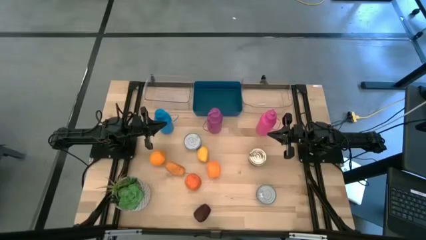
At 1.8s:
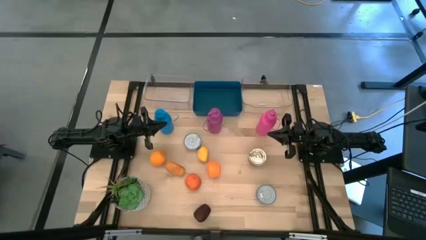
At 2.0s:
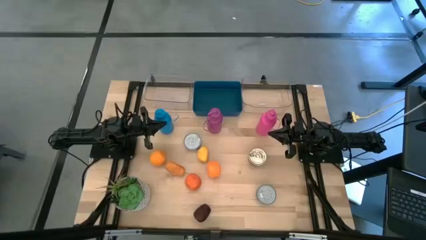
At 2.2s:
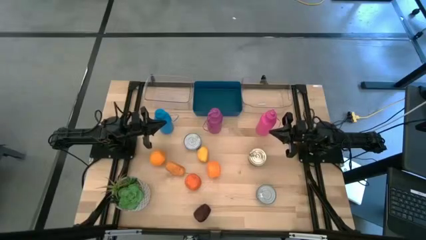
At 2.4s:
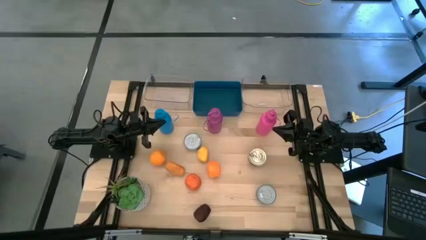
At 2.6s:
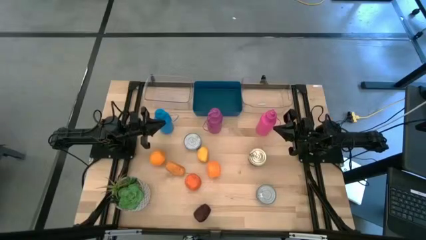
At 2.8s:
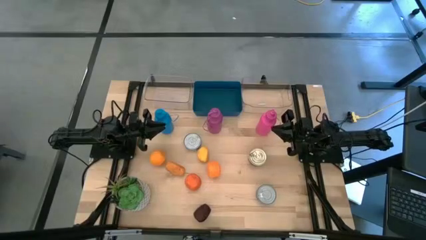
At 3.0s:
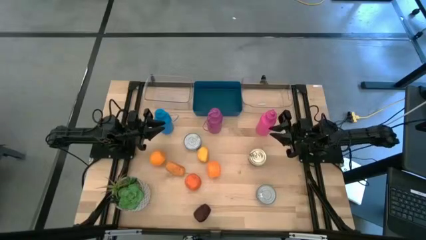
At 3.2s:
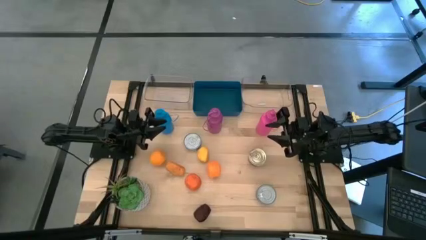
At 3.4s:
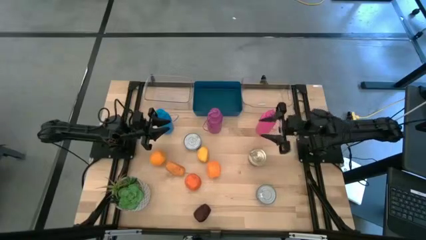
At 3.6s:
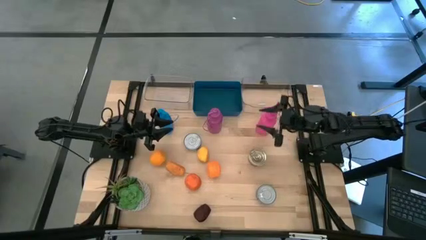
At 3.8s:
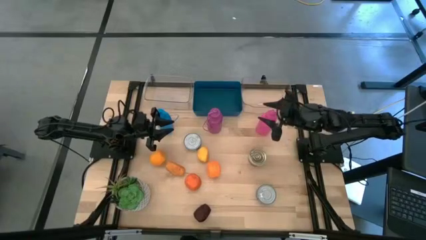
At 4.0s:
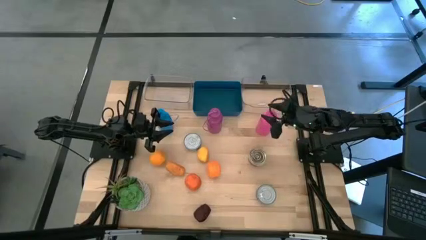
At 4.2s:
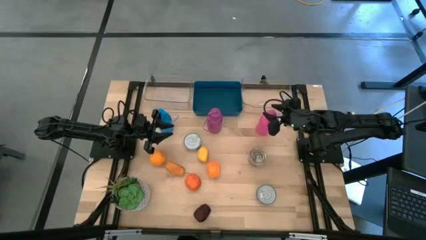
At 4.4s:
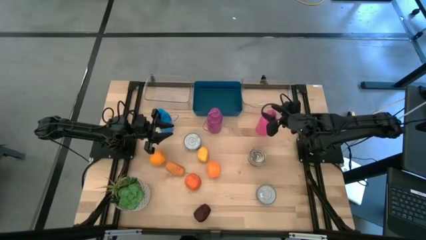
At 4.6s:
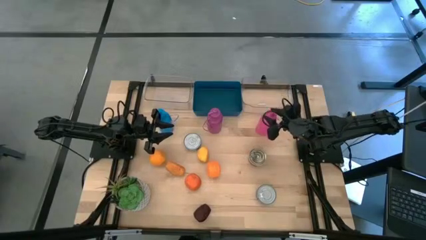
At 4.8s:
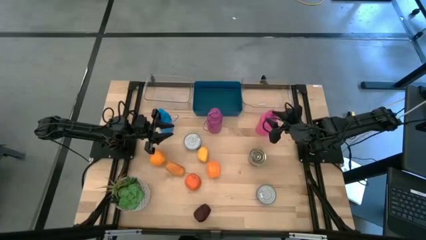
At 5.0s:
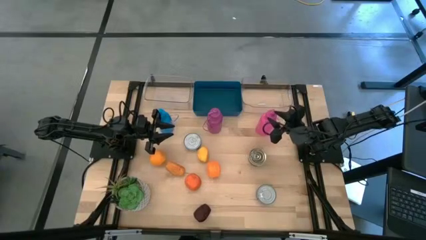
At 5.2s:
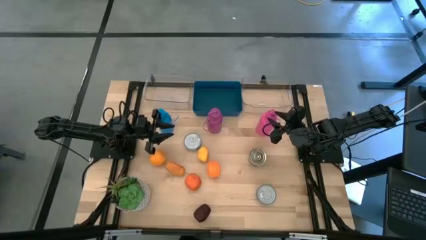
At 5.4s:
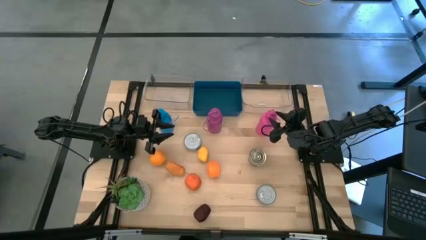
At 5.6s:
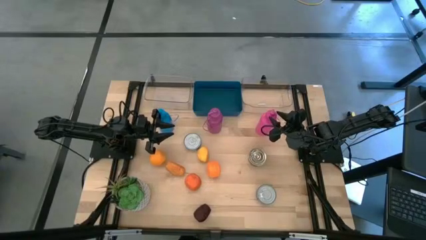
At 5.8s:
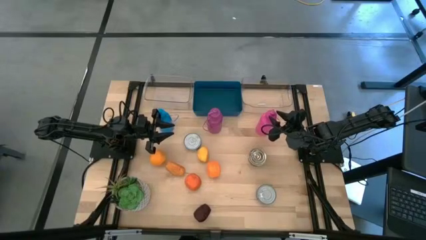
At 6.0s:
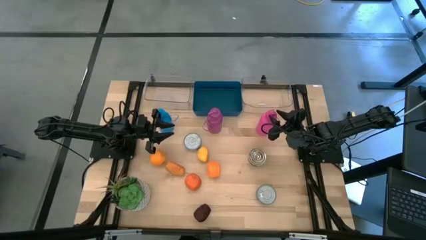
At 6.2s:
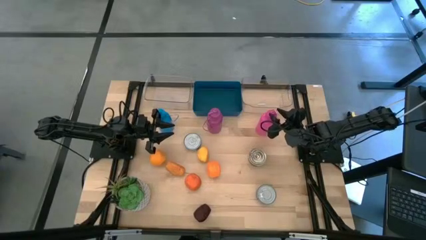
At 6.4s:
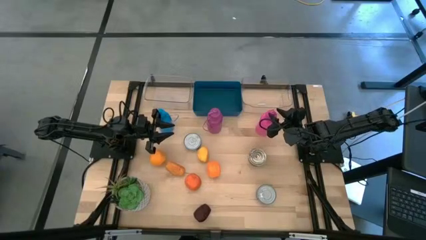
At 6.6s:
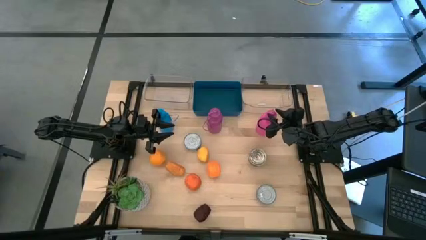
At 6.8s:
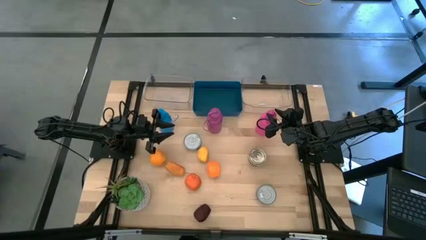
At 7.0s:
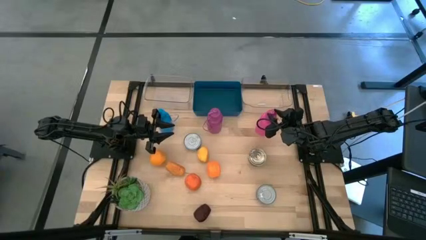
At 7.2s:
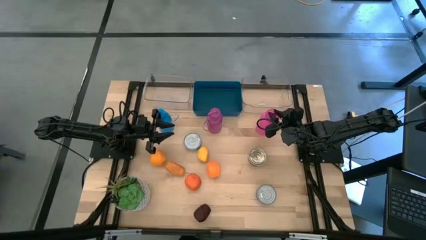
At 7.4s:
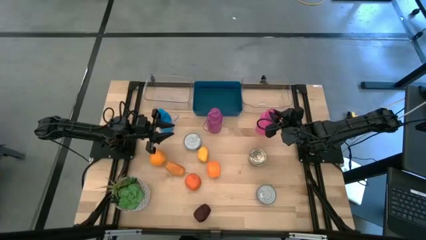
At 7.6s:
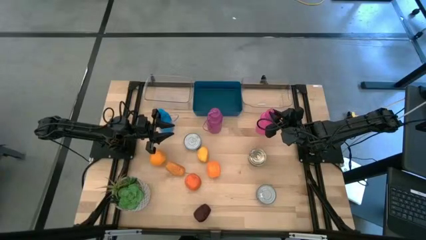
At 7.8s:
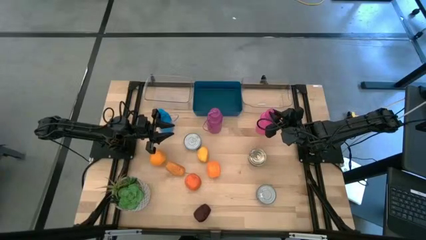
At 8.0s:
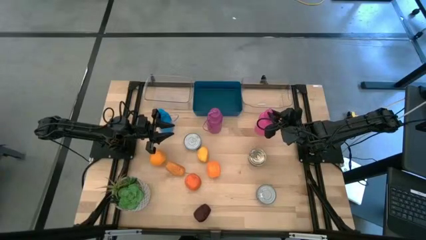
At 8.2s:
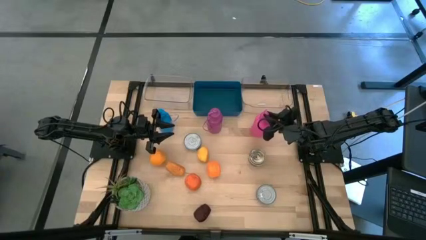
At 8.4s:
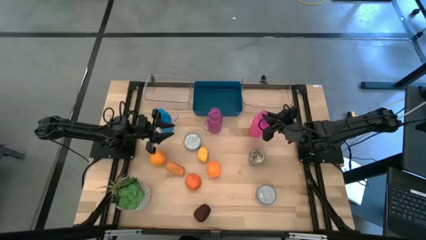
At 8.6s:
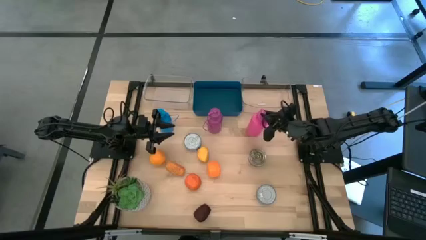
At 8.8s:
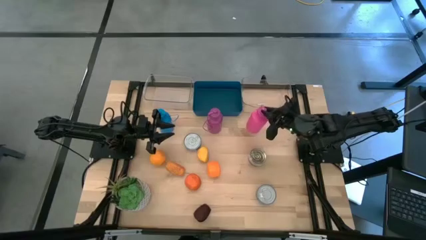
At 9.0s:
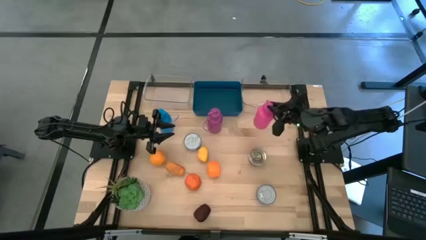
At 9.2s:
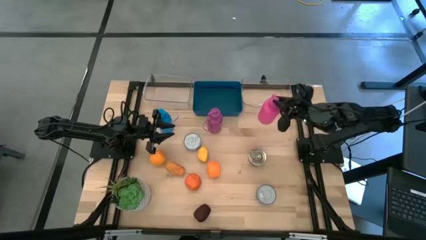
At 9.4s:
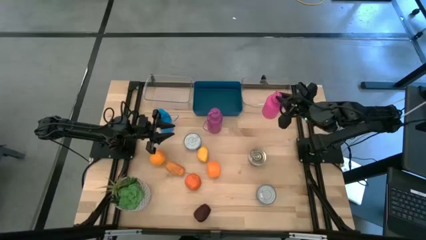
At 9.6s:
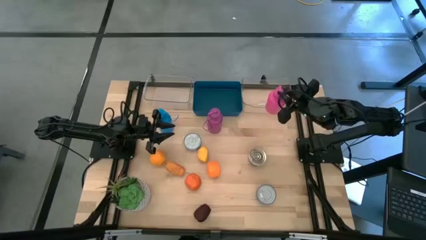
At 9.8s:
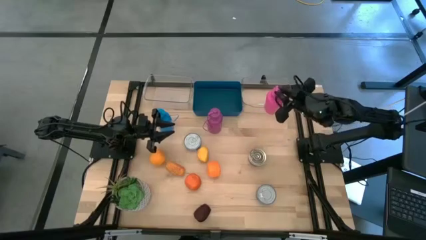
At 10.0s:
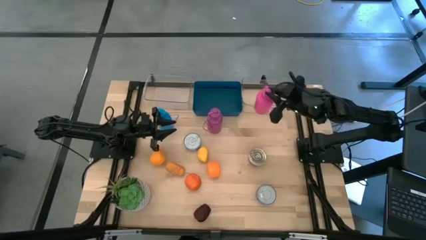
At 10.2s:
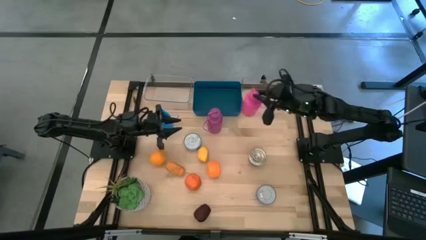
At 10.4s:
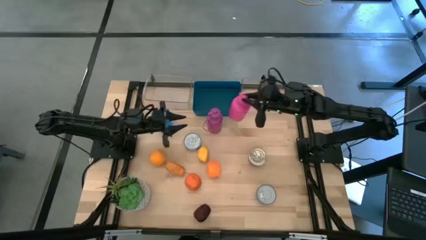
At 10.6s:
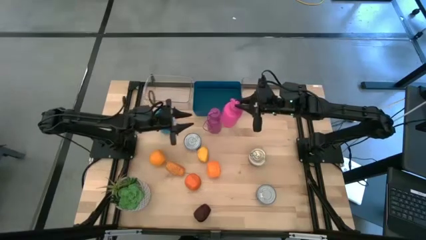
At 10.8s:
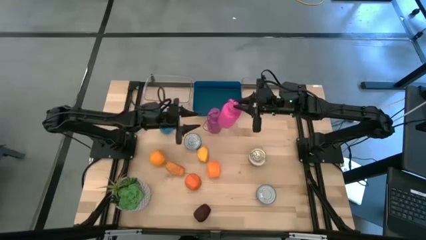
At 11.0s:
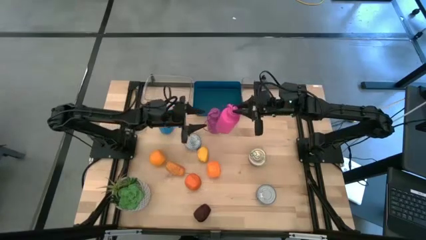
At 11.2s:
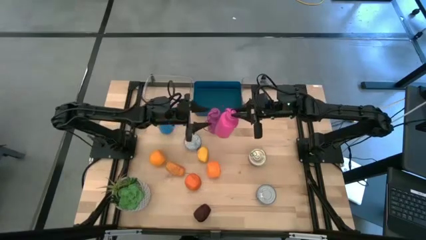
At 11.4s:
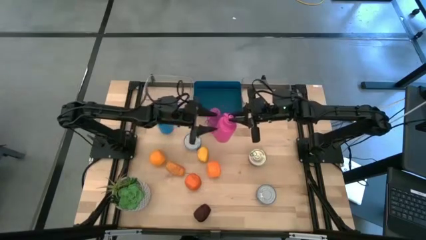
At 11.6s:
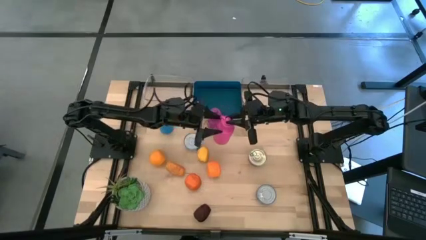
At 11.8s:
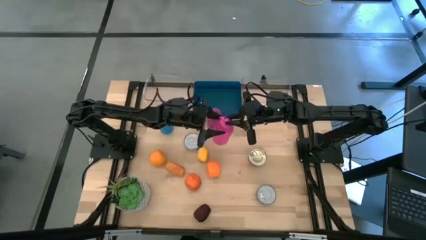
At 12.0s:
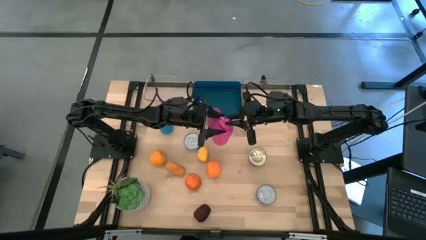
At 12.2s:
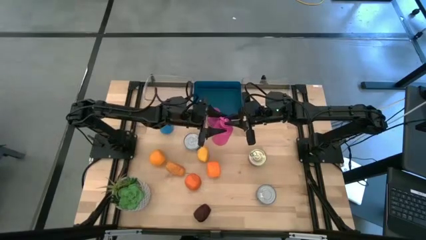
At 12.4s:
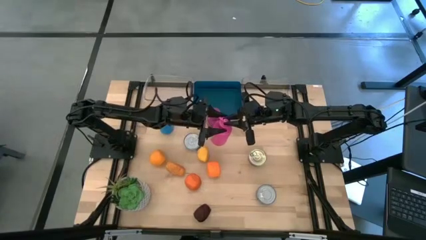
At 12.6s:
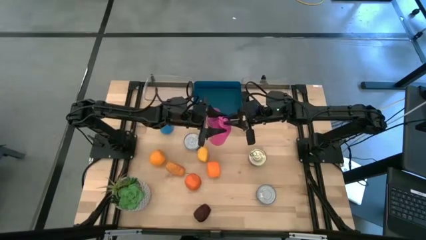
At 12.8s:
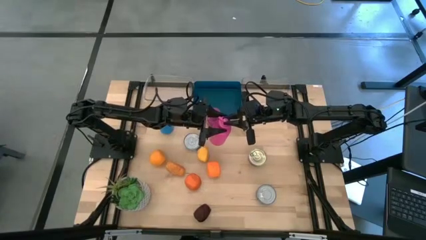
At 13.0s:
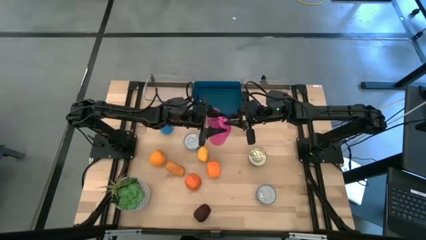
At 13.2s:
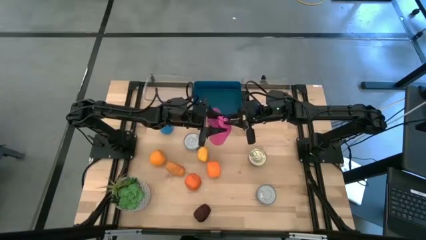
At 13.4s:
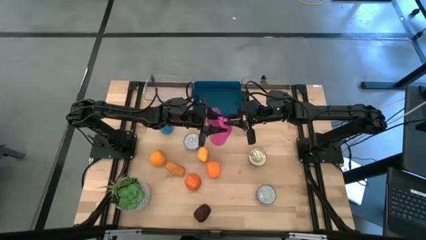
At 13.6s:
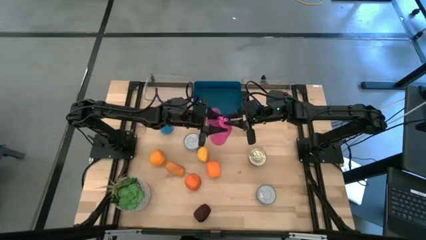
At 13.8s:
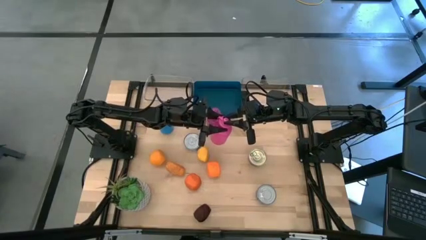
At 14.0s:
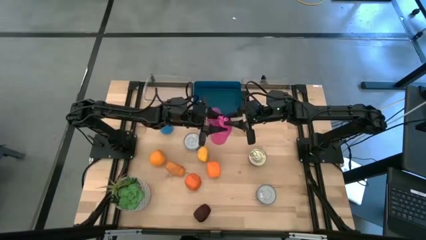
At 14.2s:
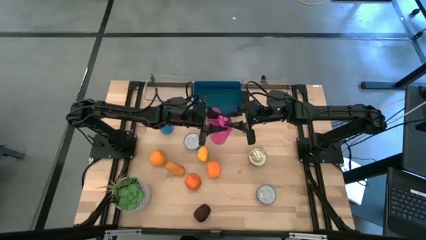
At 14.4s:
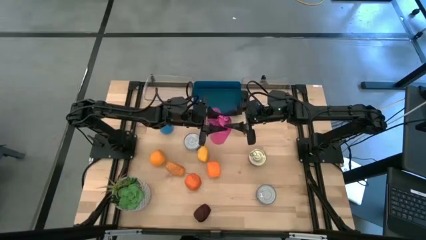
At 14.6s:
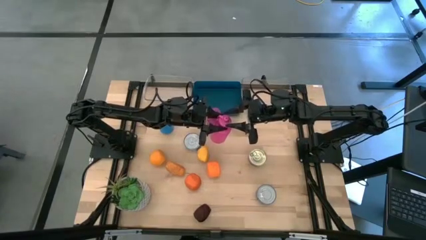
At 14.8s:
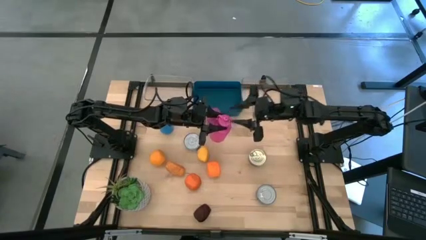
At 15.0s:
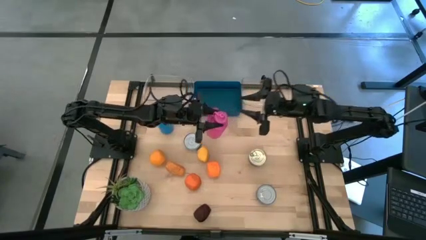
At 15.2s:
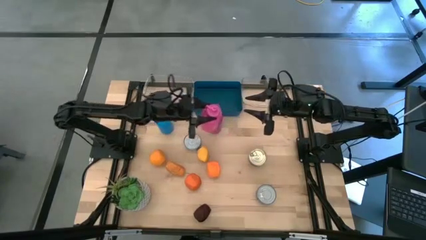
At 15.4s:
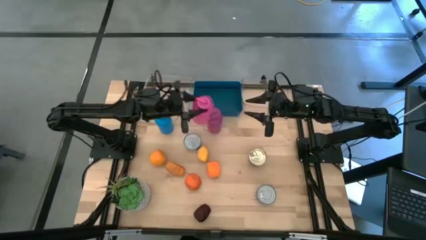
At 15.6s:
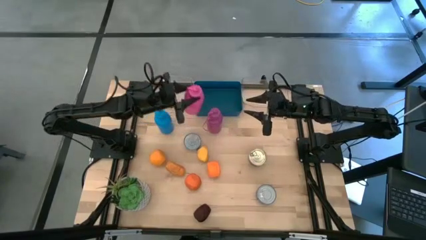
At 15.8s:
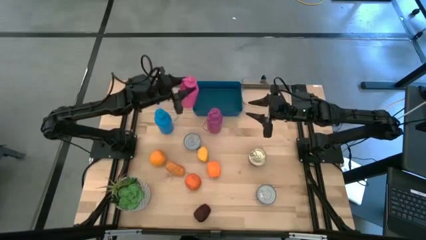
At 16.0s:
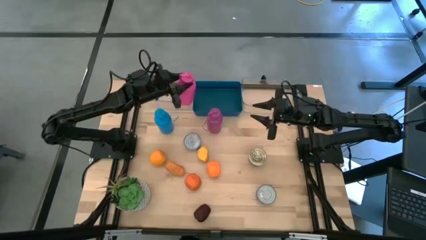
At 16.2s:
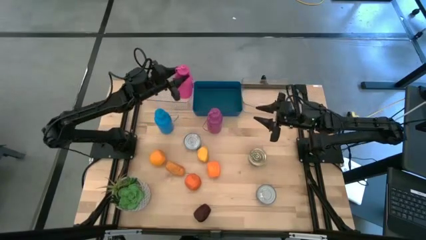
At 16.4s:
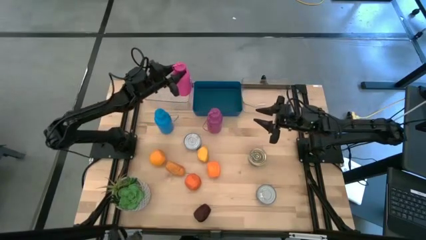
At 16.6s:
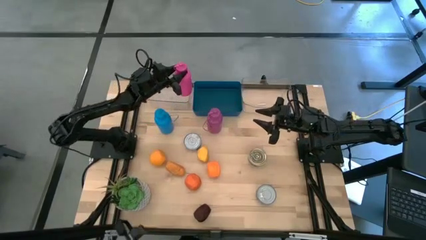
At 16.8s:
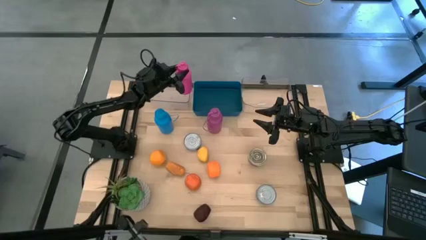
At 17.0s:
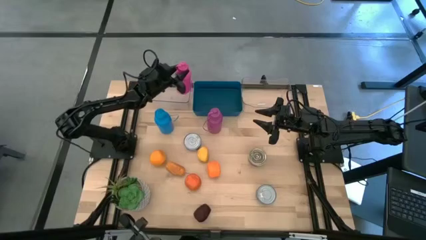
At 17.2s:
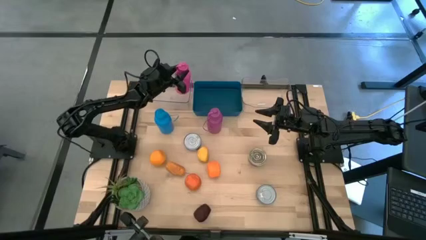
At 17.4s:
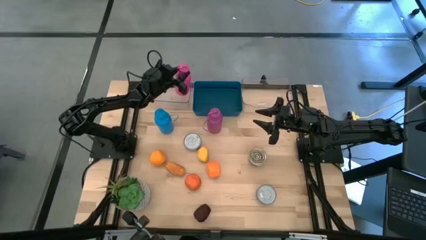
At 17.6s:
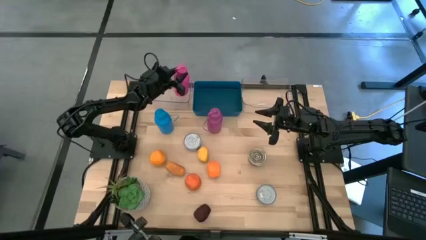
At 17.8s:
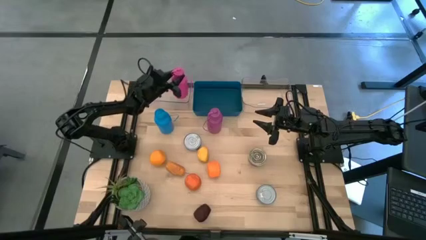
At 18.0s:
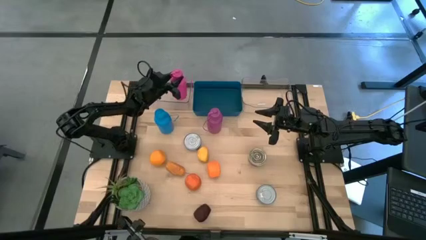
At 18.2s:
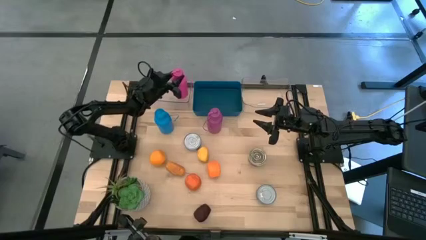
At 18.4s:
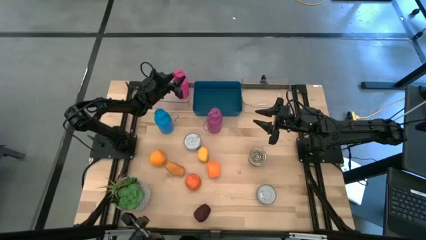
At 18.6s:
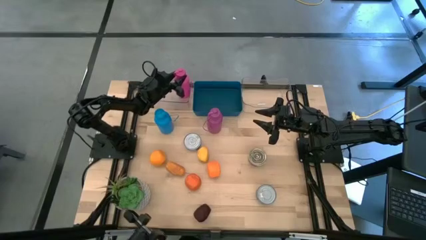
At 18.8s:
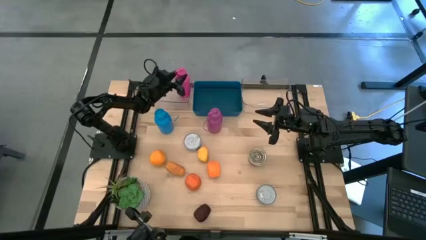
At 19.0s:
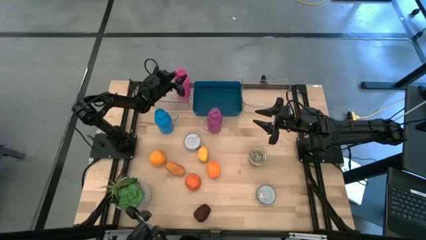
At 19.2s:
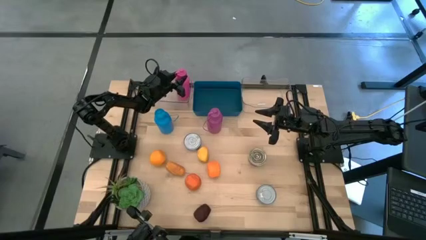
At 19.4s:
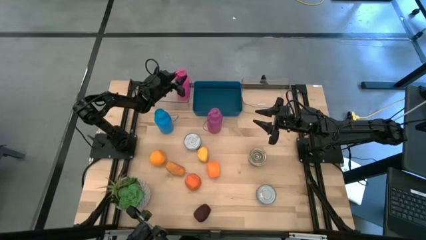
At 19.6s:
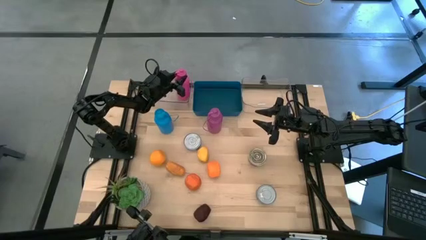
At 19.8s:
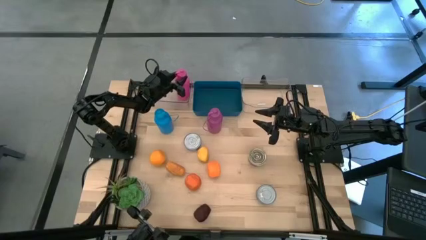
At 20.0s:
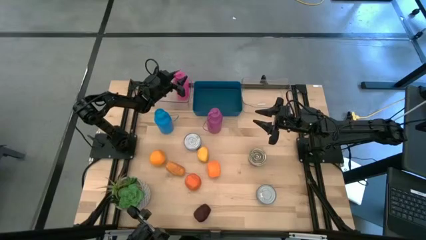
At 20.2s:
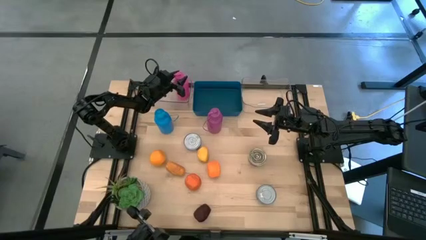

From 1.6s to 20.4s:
Task: Pick & Place Food Item
Put the pink bottle into the left transparent bin
